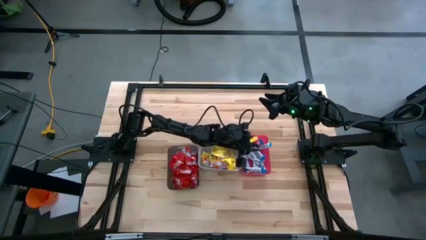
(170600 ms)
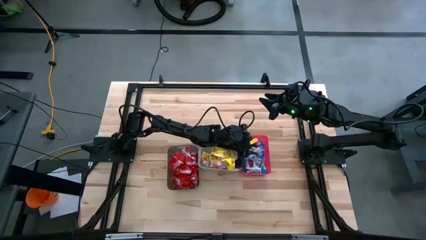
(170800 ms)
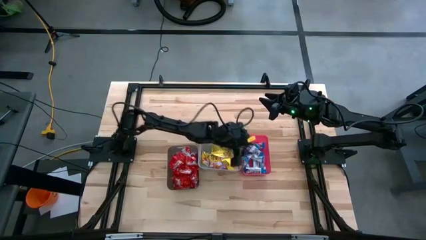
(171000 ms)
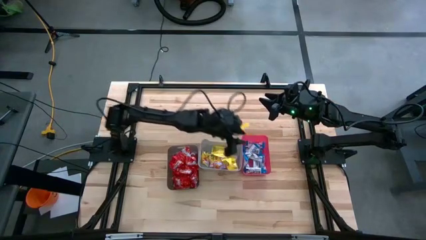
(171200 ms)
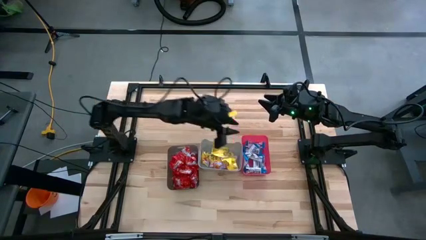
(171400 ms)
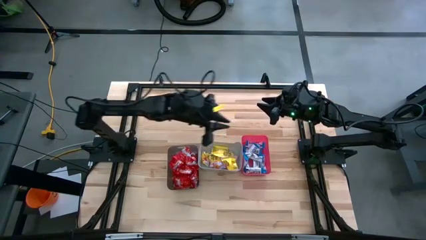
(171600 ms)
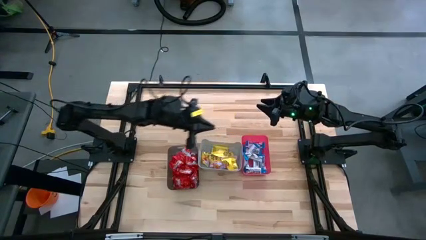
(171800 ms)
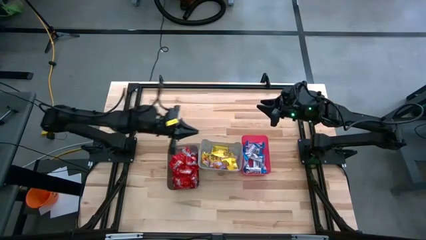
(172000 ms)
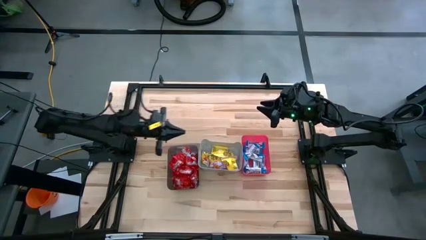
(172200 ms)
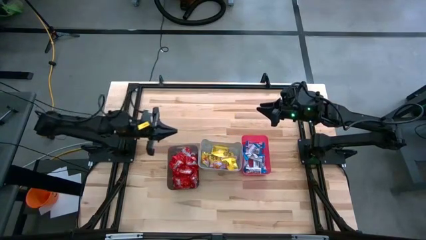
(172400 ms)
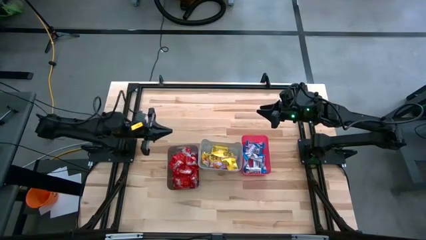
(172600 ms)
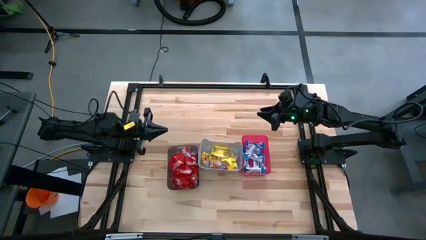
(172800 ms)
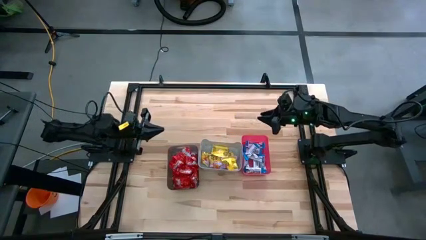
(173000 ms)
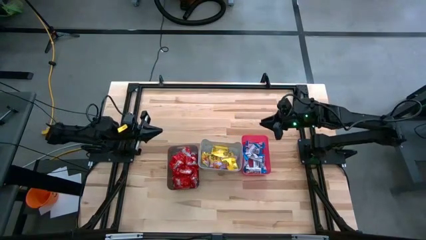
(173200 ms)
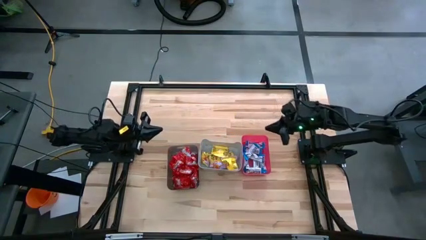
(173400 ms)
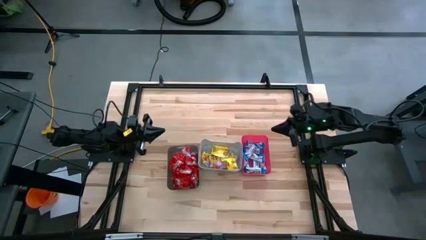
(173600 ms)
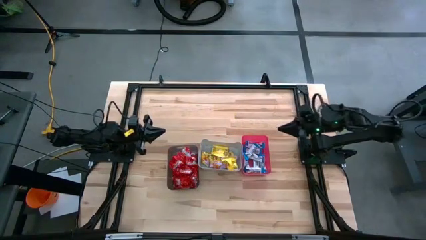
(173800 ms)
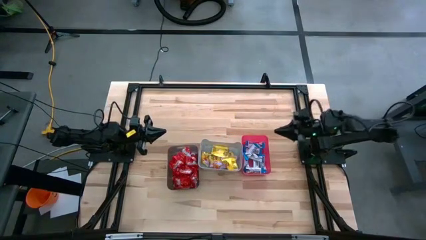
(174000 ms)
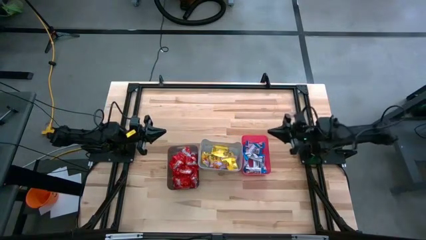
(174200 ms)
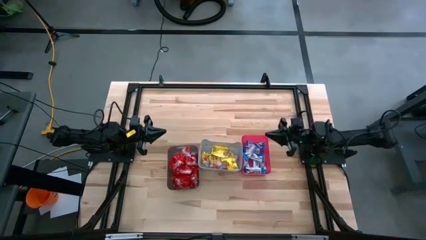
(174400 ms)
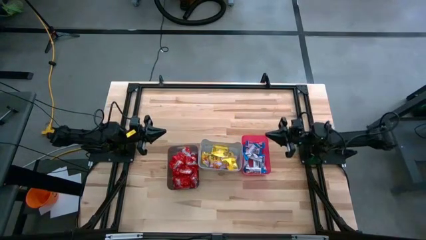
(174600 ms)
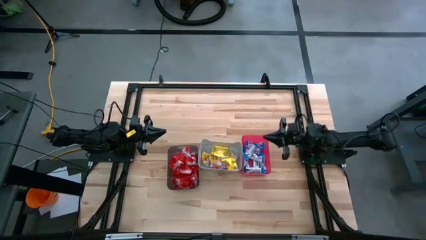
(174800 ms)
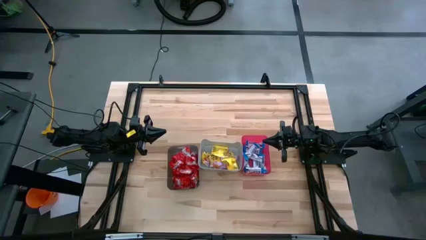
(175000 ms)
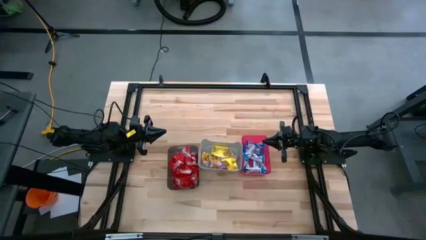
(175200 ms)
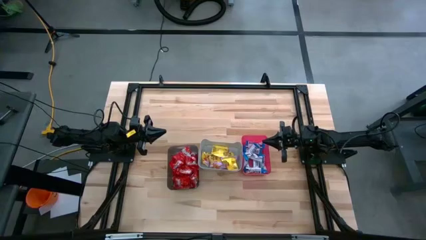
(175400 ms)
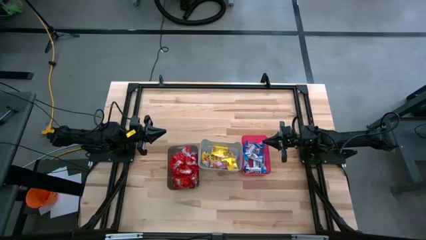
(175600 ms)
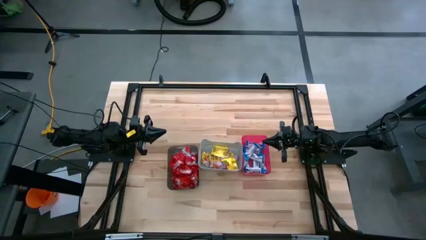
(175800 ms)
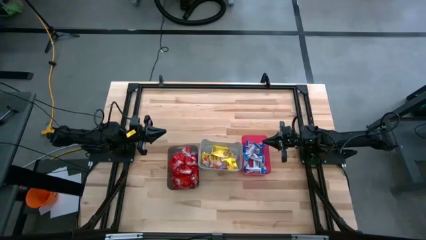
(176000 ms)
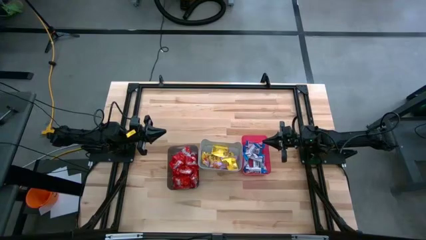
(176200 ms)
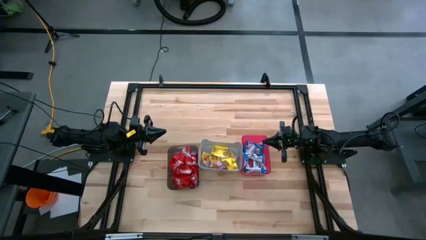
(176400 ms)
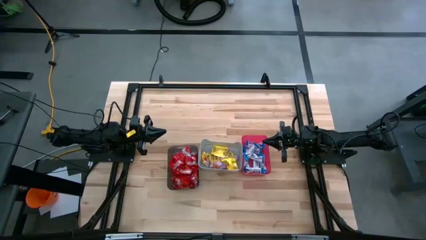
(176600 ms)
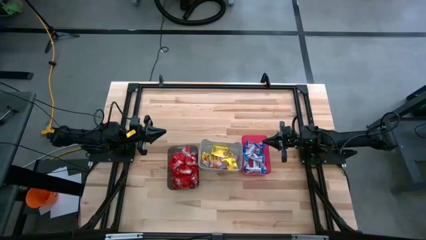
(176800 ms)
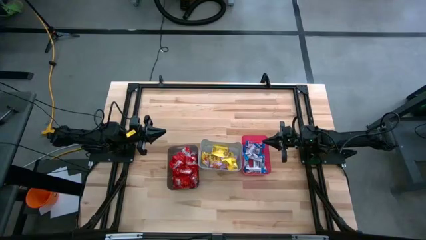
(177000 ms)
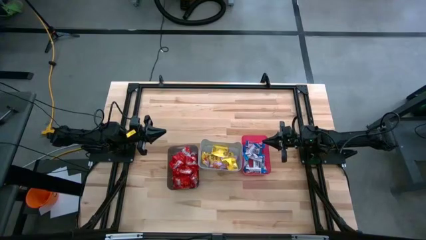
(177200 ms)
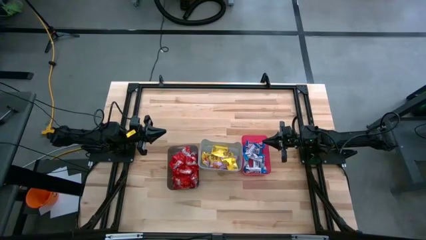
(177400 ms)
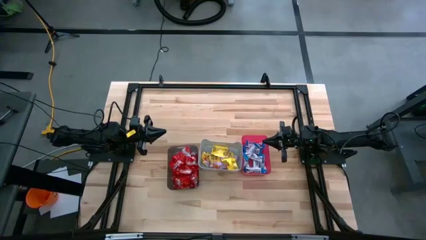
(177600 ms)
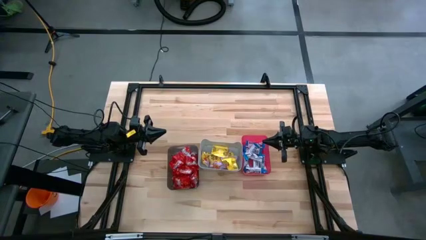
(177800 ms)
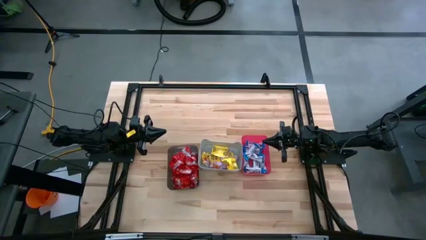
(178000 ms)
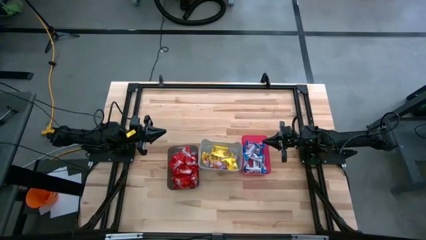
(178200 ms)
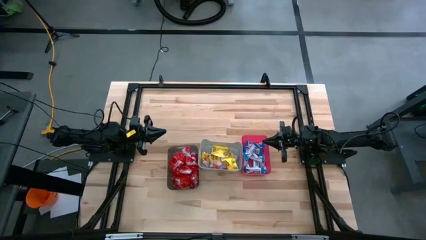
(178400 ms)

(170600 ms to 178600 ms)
Task: Sort candy
Return to Home Position

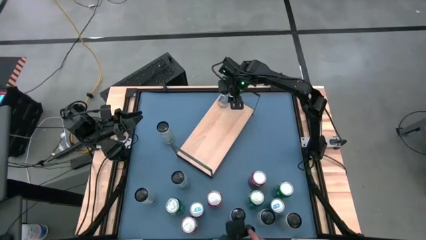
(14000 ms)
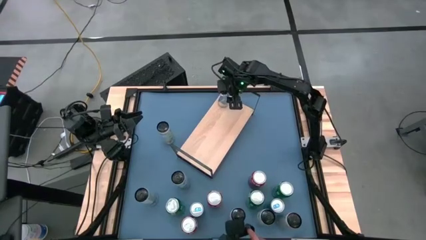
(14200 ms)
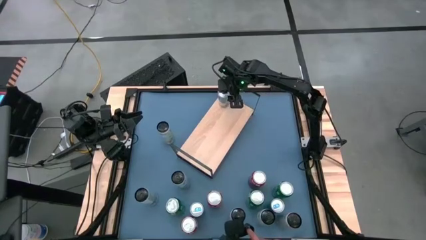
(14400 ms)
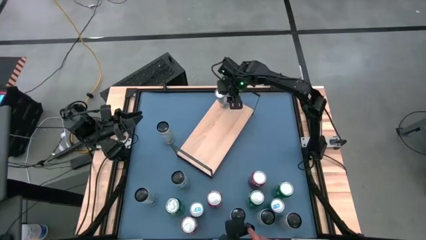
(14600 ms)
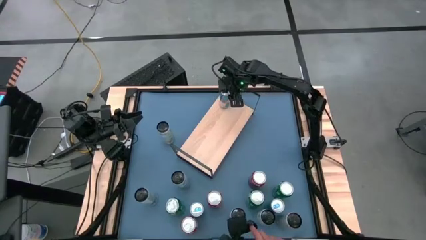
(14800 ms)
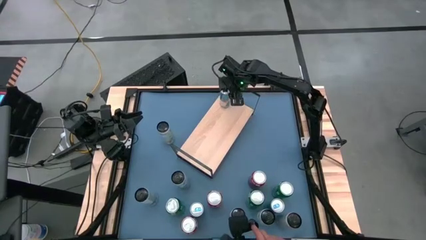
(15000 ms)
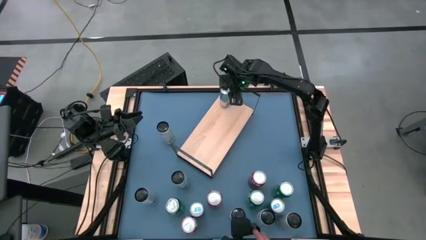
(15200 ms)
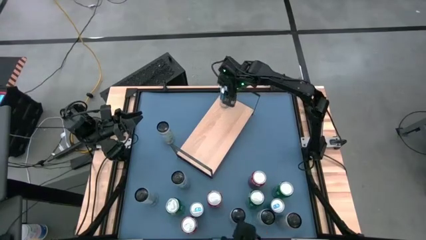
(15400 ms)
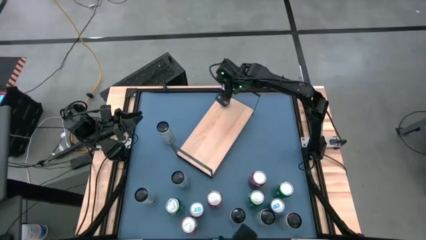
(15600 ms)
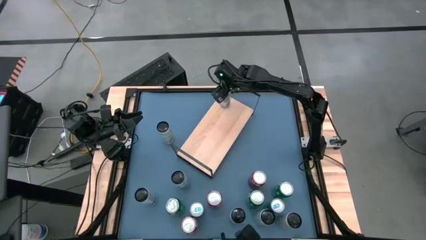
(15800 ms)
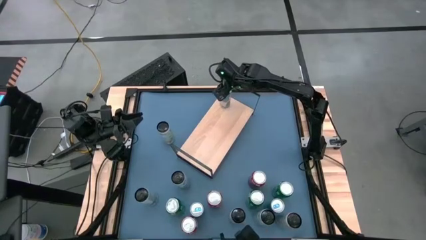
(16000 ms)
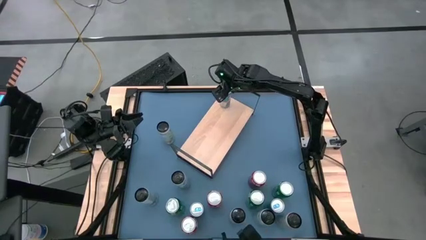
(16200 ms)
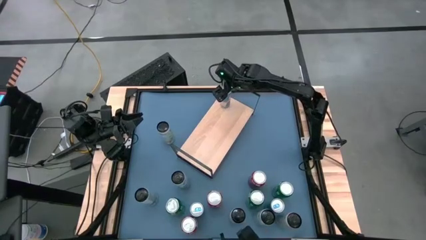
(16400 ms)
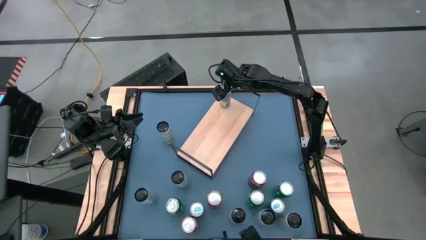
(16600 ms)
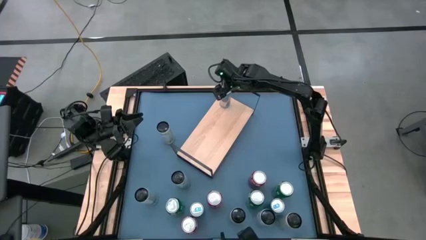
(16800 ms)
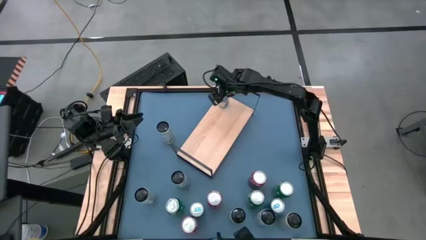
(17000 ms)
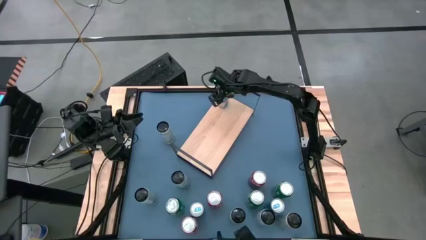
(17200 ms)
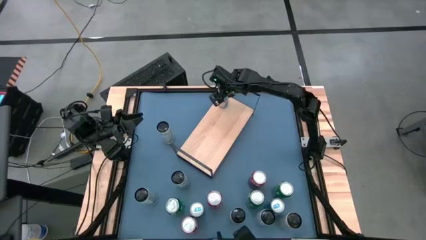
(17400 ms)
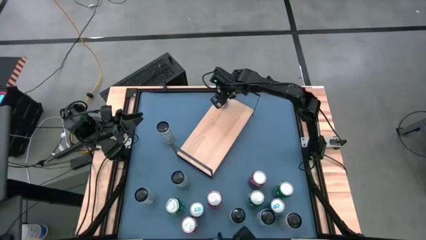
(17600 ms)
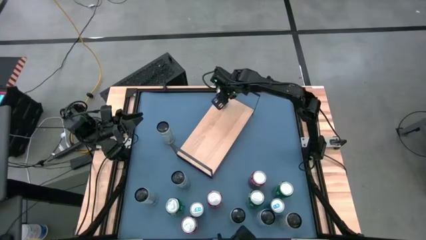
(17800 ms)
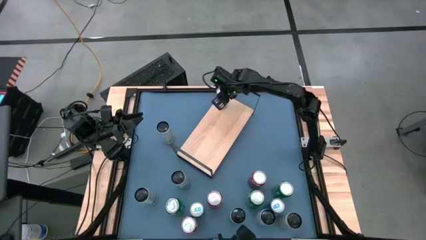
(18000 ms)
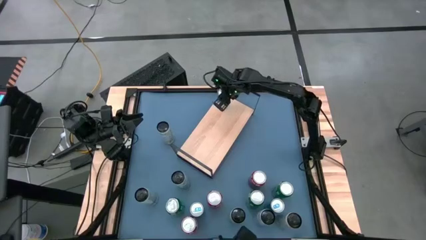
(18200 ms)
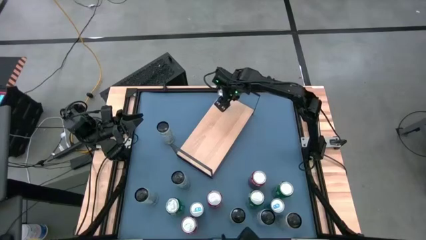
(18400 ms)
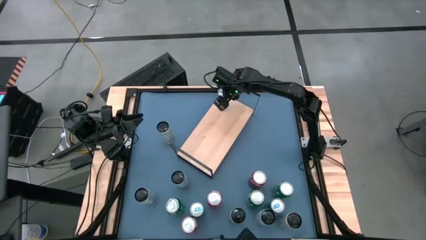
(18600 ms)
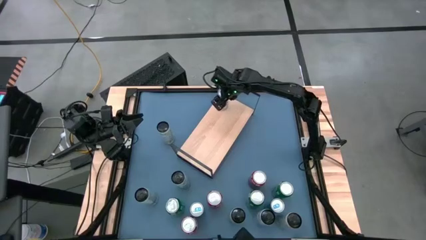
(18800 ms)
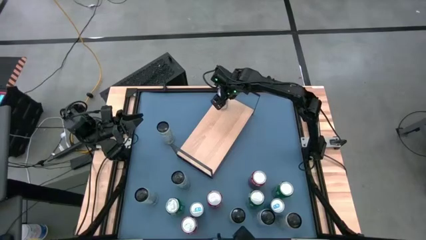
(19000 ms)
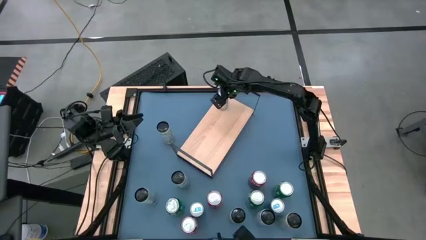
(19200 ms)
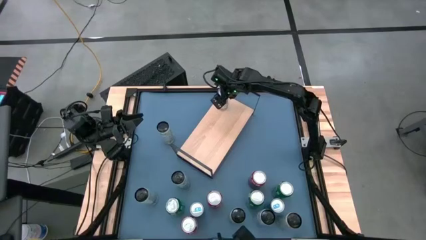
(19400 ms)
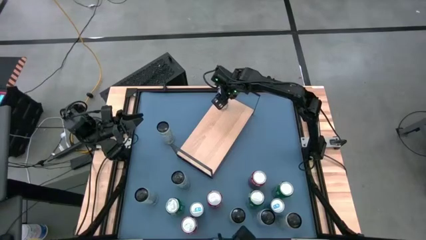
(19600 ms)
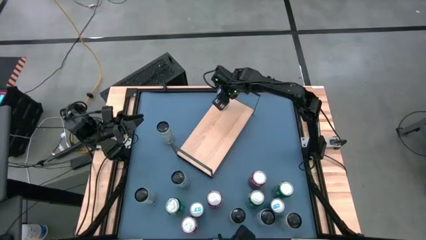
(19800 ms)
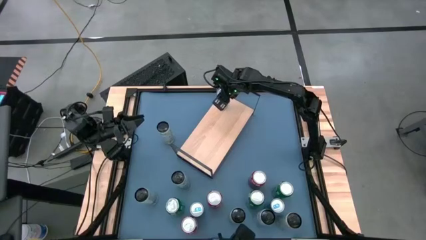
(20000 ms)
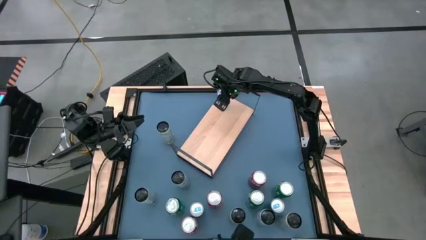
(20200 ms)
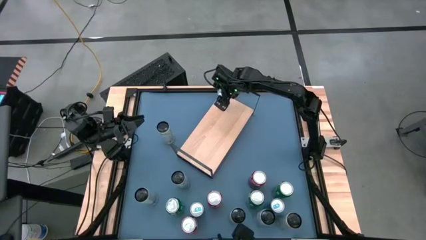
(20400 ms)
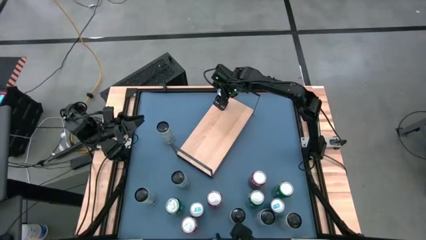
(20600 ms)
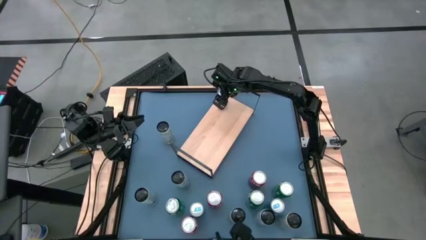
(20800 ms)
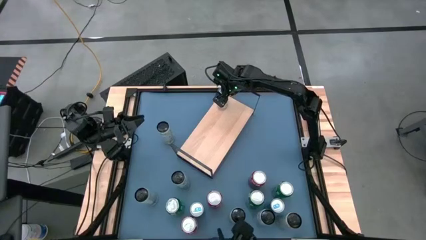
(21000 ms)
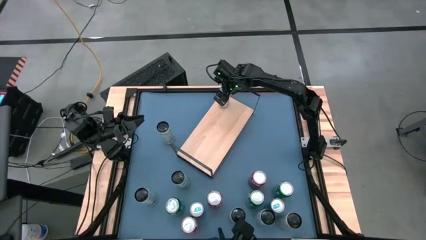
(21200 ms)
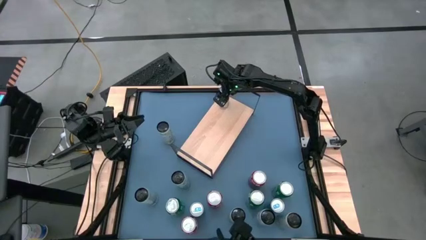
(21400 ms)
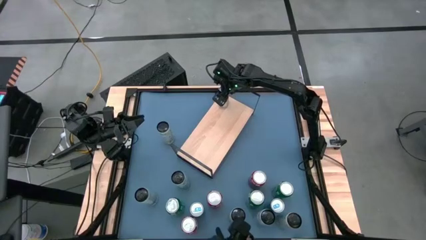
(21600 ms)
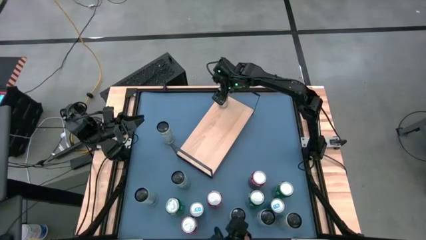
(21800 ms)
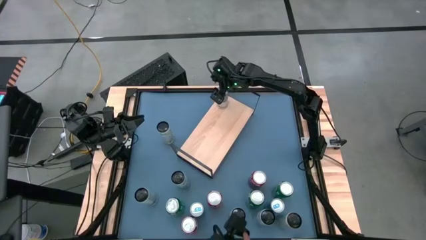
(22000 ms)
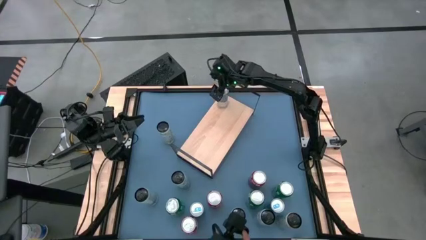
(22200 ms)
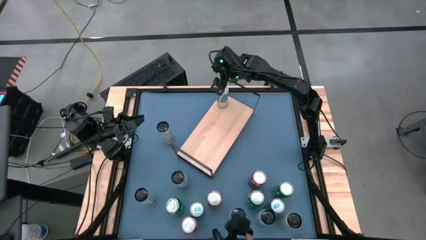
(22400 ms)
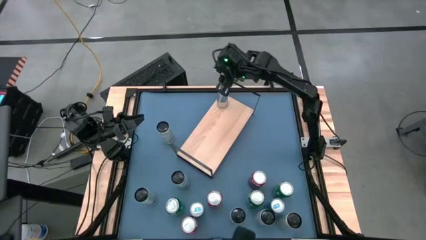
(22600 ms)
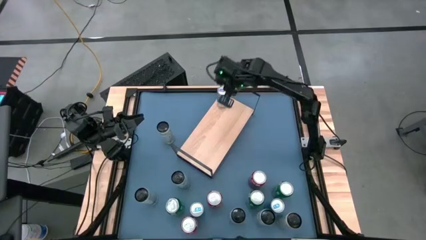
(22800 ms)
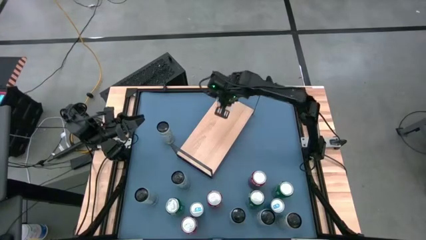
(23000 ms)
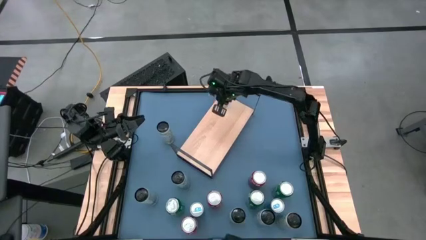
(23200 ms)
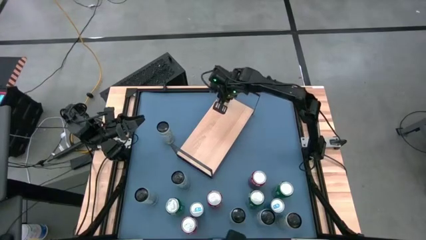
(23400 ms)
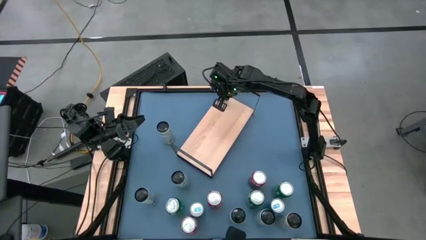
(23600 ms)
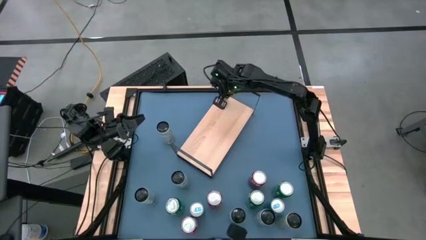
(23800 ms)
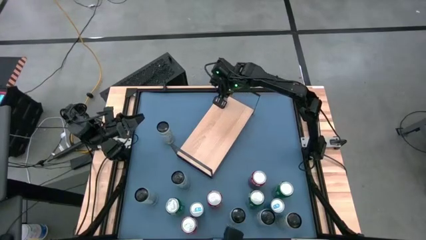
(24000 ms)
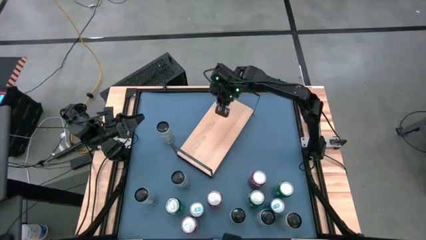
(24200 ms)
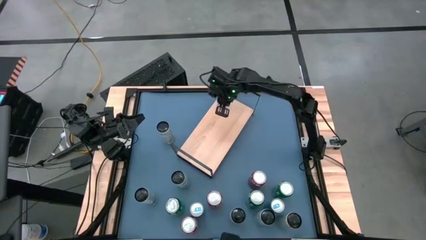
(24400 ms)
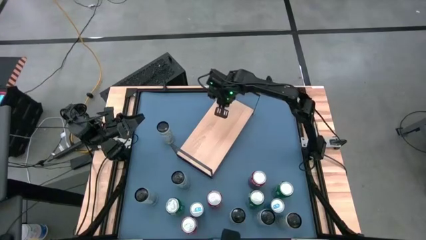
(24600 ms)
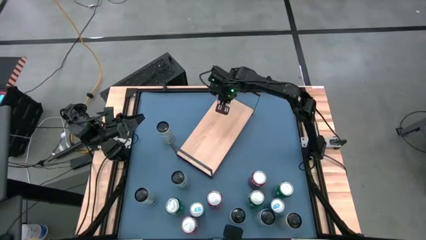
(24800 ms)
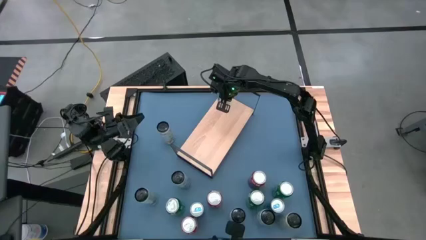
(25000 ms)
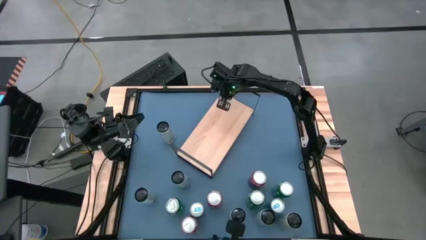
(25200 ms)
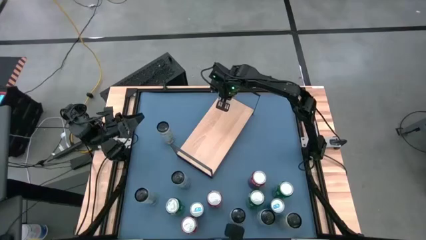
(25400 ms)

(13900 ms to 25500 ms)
Task: Place canned beverage on shelf
Put the middle blue soda can on the shelf
